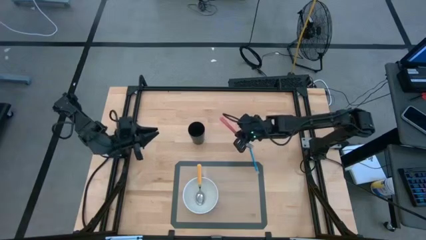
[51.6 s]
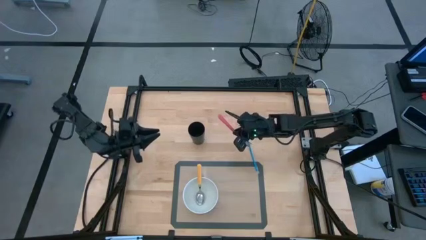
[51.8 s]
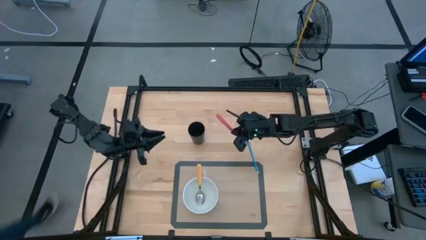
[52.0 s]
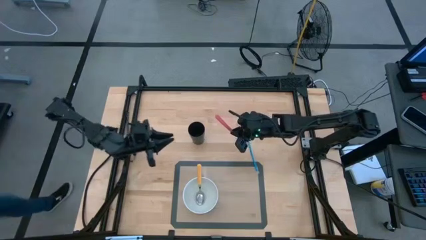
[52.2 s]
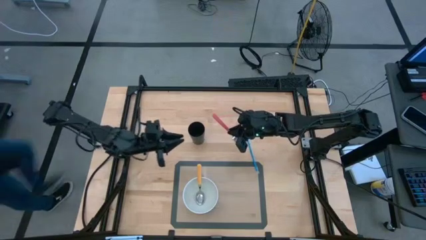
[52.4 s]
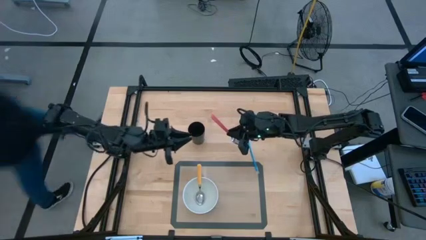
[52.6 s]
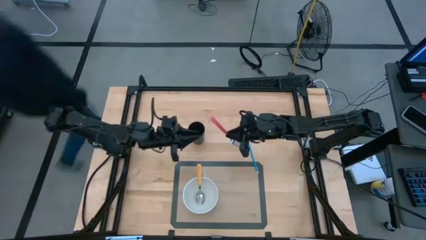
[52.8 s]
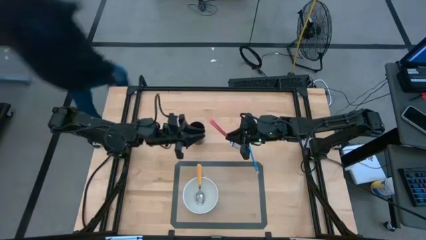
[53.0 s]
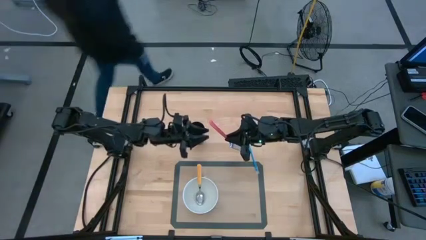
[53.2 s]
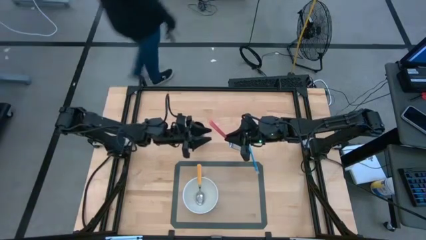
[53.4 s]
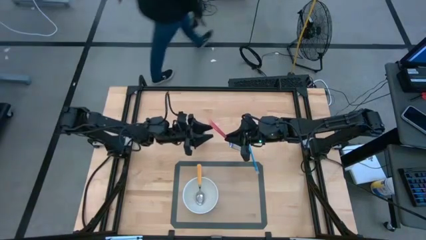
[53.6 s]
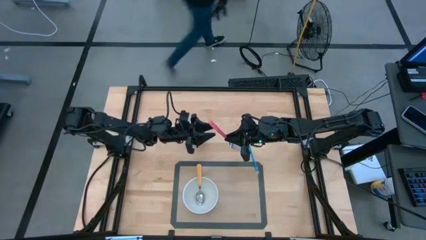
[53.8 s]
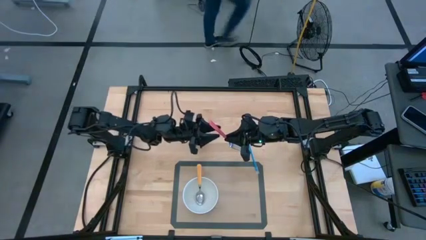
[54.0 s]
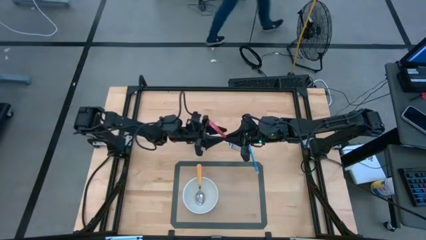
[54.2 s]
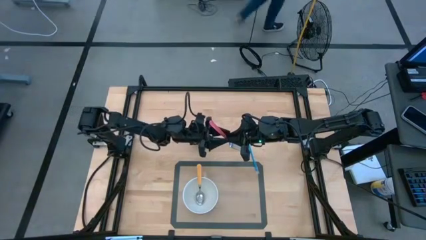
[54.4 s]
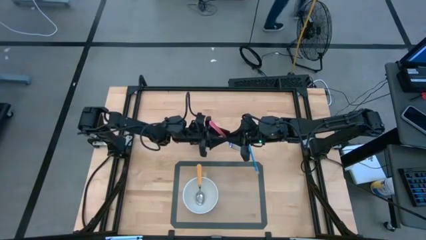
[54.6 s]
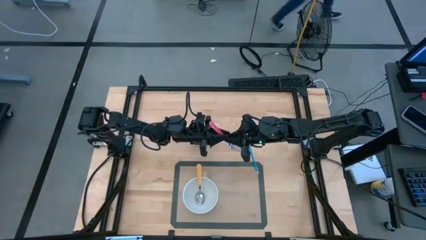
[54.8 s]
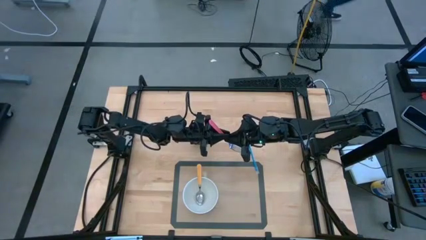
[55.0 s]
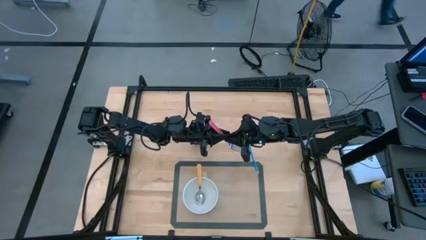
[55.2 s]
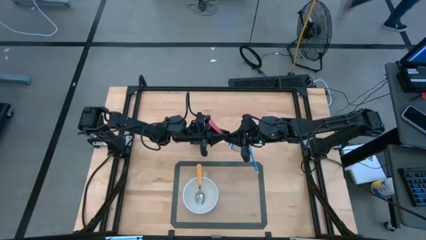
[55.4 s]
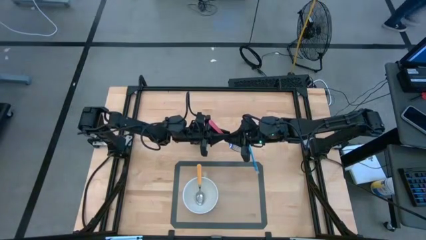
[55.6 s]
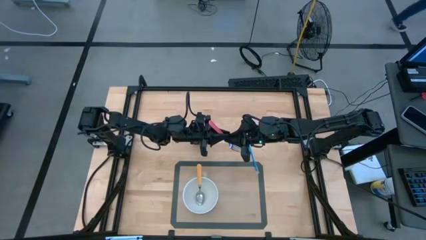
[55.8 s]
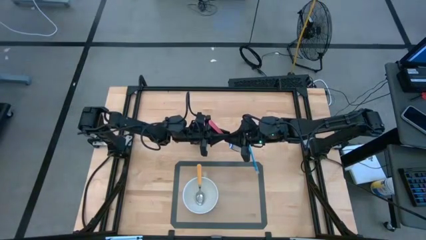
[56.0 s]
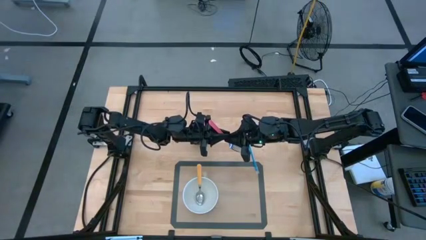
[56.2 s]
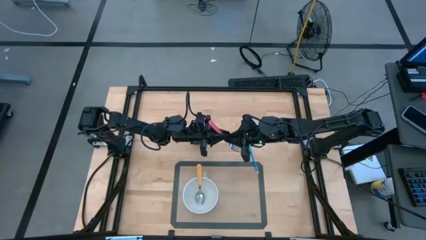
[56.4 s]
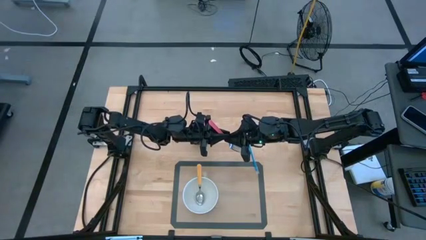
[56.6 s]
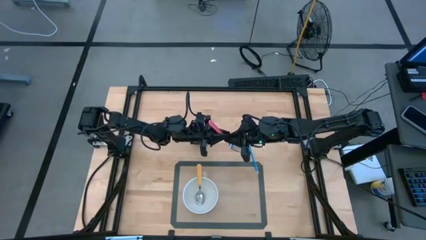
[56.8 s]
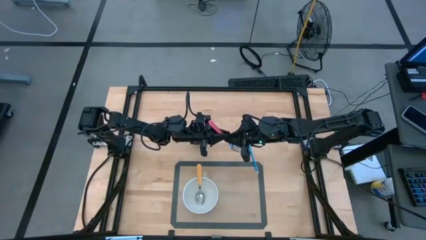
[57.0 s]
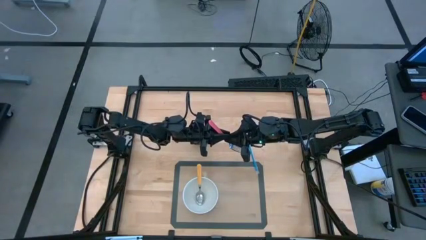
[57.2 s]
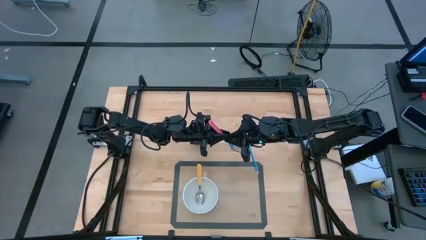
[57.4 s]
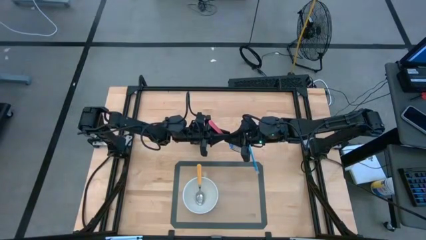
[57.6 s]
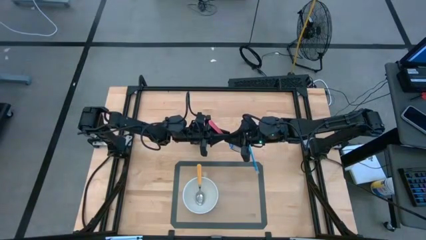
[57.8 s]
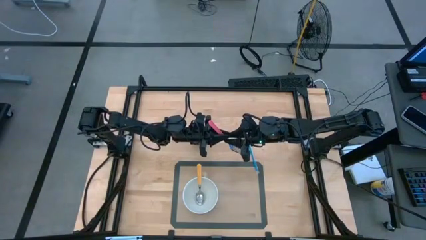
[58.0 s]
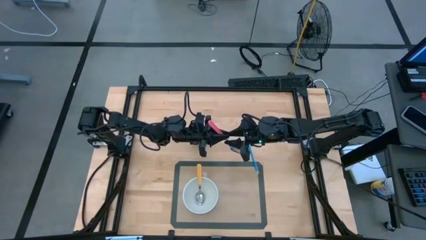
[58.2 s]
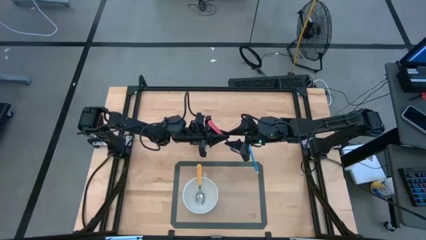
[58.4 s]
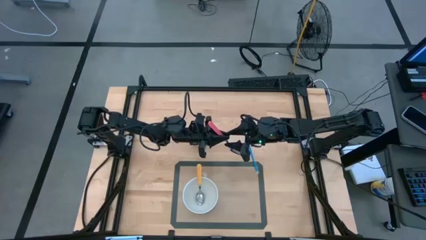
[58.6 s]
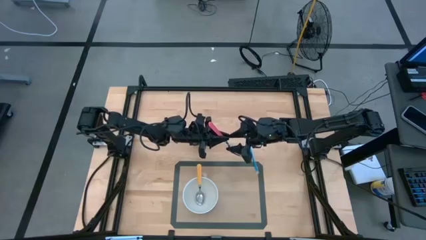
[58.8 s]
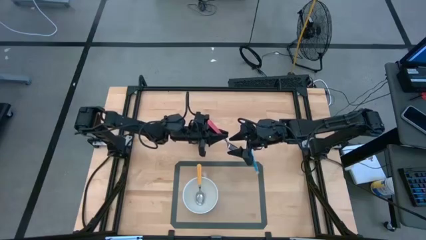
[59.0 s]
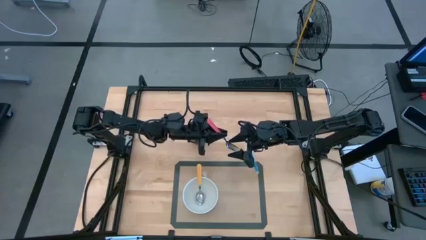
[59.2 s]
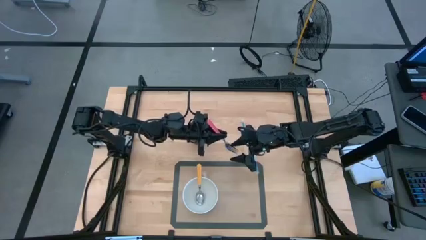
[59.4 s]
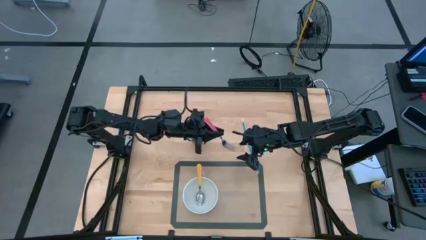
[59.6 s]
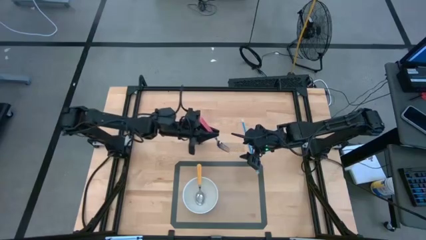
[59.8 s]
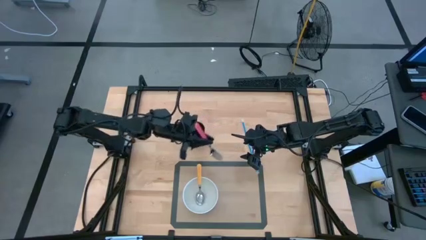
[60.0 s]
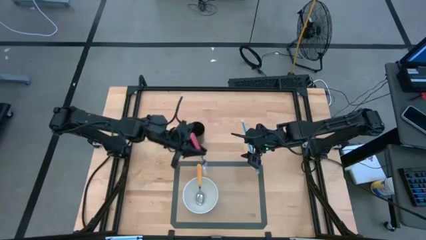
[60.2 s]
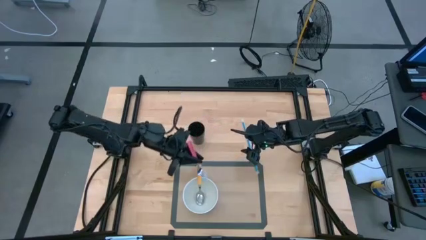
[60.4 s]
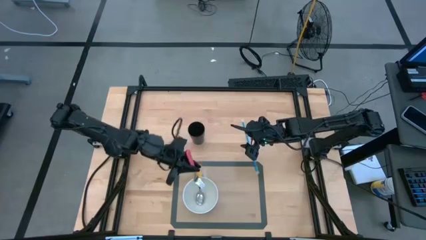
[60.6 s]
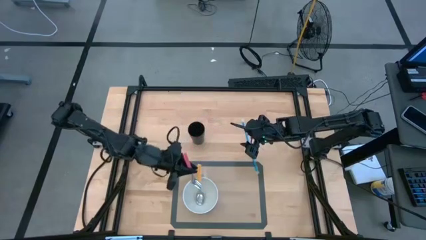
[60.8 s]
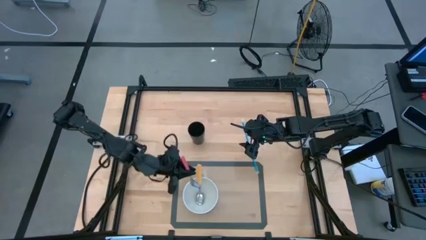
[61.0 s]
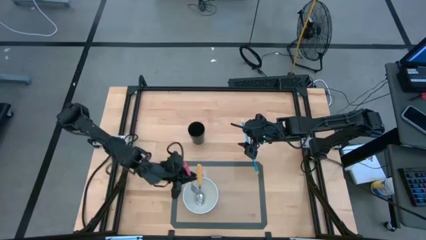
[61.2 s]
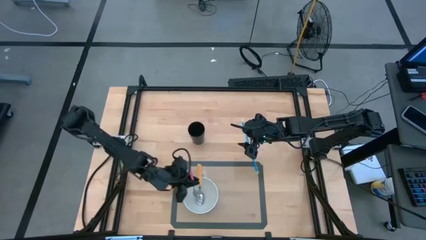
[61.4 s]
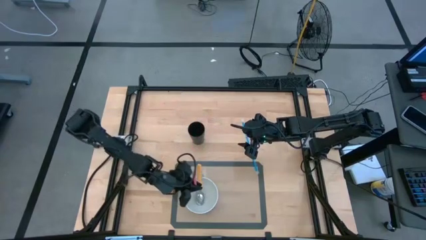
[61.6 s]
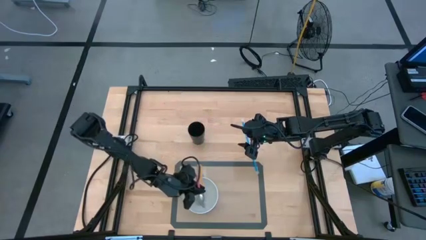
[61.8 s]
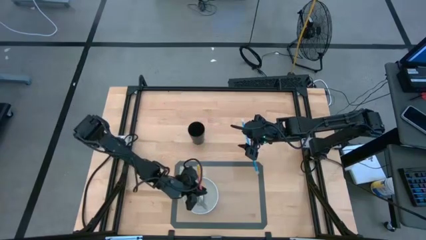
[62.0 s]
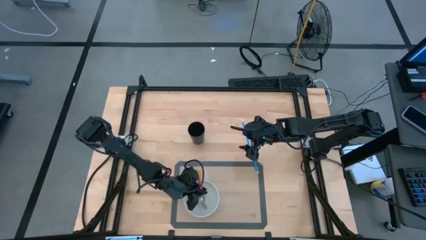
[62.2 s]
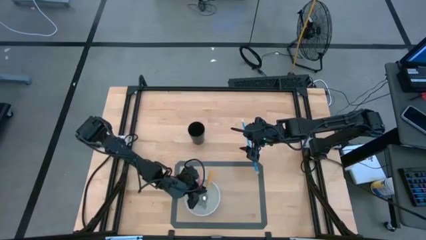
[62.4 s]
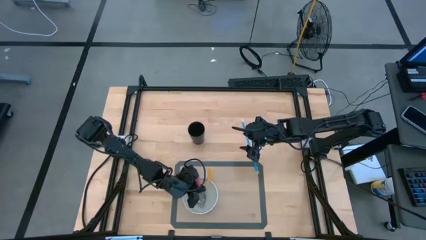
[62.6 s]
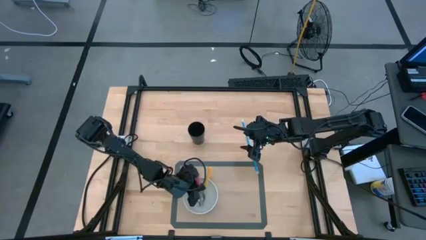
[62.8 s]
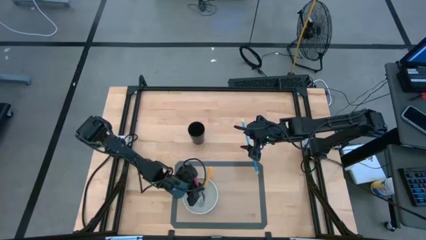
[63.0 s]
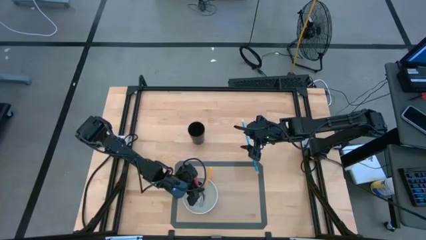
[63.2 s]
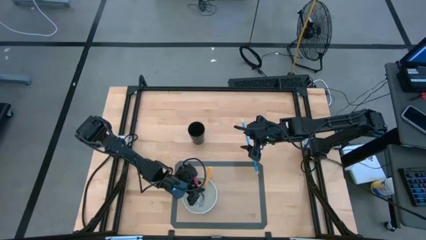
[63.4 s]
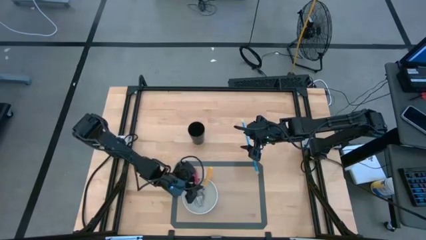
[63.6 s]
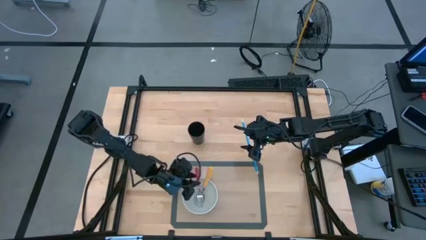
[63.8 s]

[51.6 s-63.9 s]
Task: Pick & Place Utensil
Put the pink fork into the white bowl on the mat

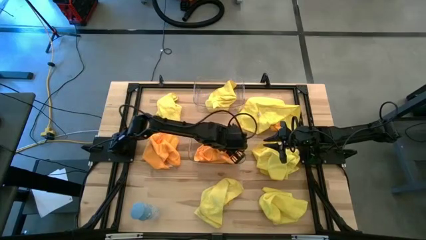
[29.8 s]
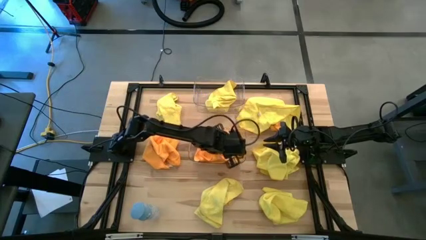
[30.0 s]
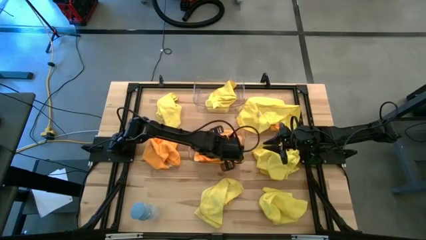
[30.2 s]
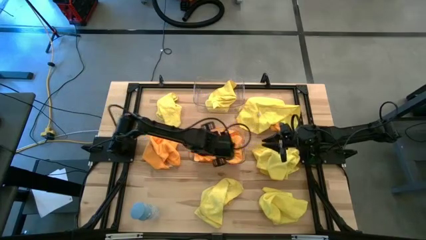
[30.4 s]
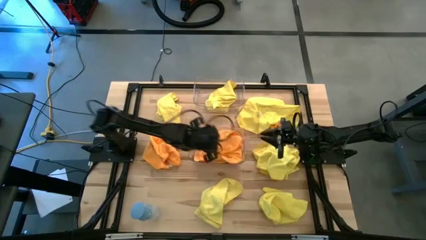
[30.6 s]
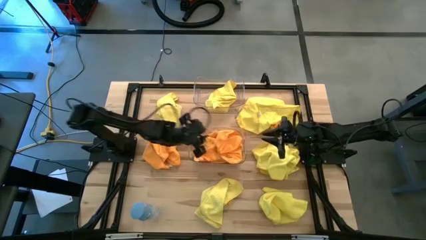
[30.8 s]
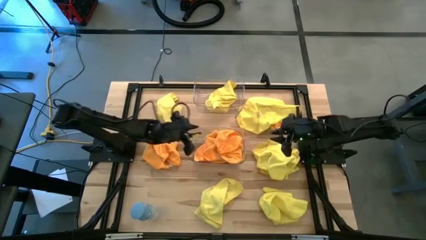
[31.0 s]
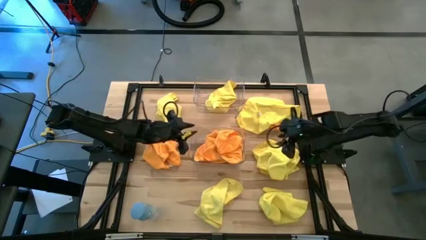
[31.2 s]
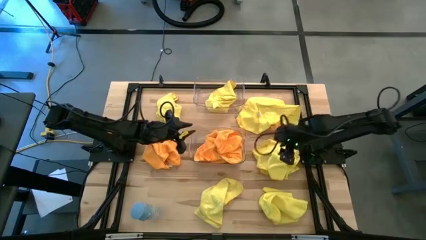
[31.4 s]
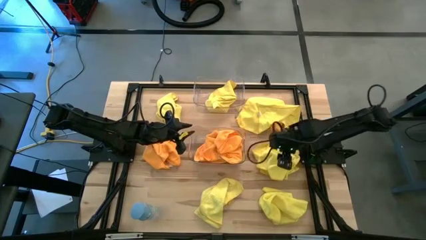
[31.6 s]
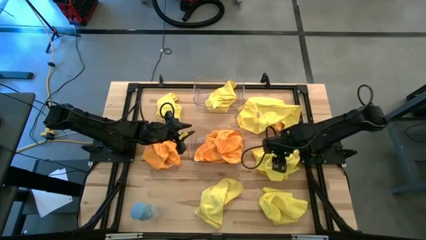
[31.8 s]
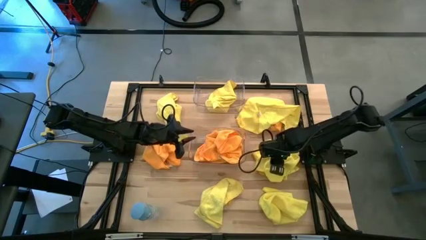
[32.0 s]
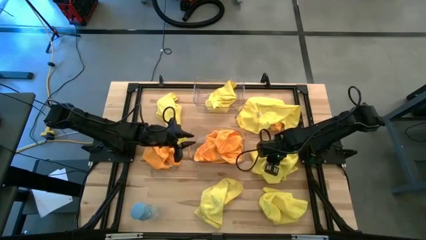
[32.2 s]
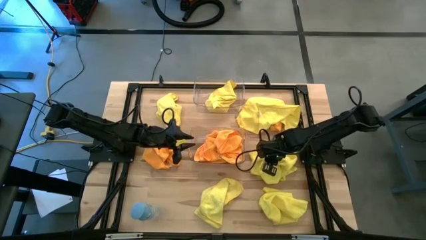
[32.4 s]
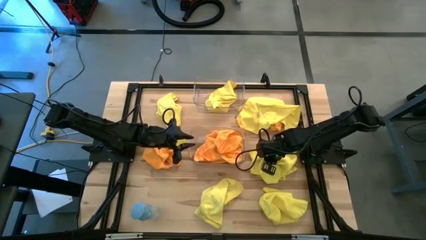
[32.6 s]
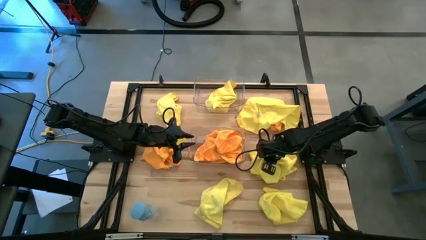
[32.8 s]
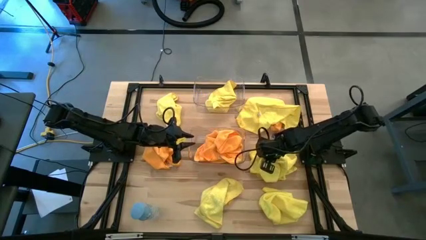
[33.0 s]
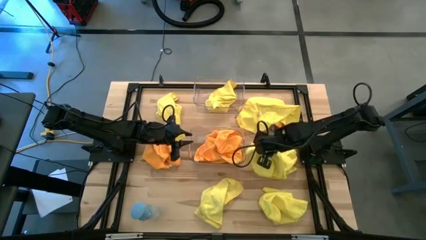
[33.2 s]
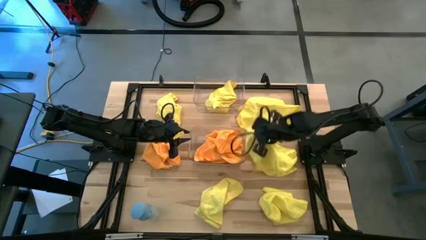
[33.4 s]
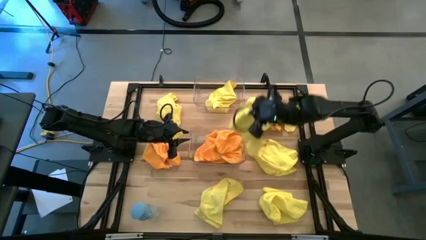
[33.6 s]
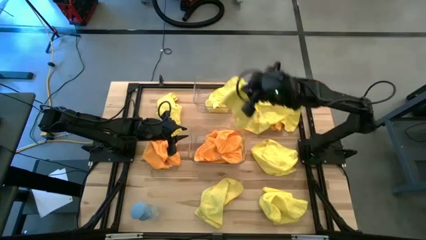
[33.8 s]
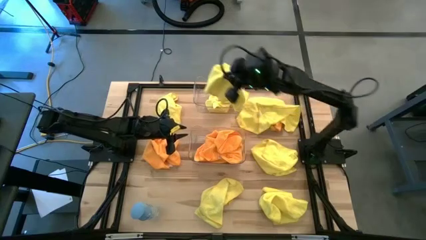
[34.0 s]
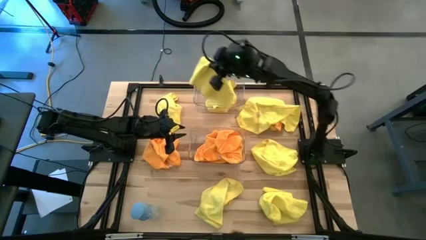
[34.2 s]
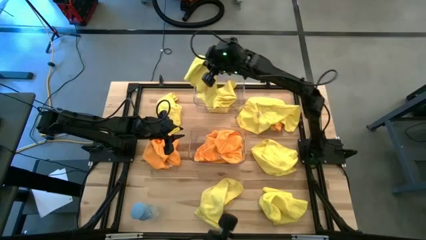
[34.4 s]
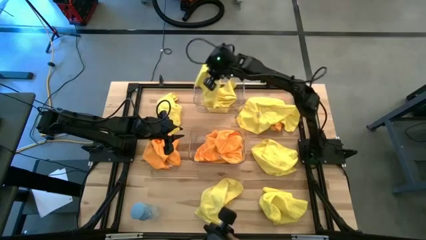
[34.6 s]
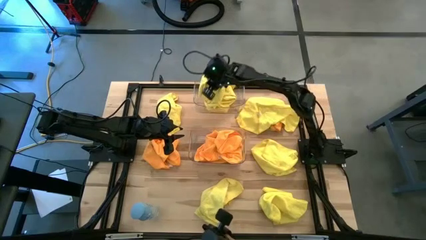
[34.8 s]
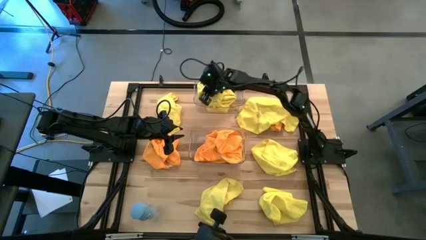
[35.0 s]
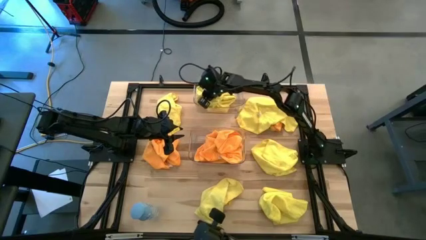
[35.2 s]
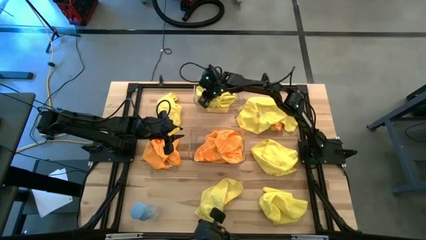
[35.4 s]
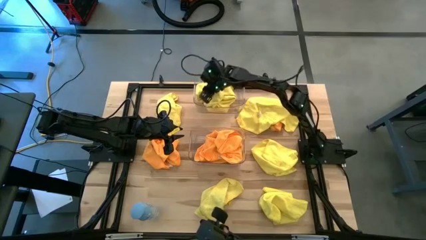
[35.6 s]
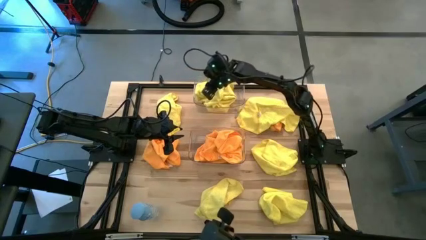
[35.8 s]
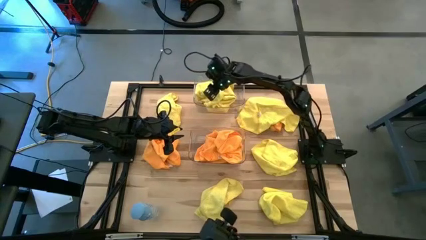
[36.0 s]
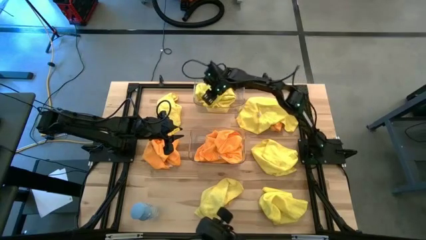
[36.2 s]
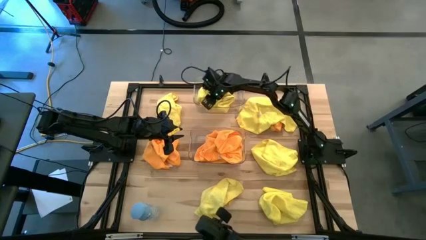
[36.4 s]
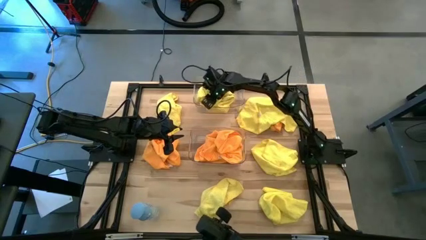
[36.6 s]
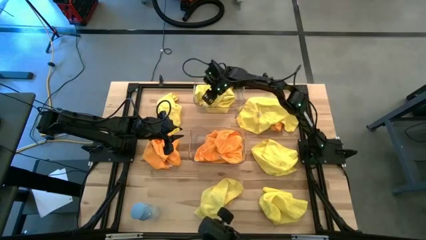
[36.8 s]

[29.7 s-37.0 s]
Task: Sort microfiber towel by color & place in baskets
Put the yellow microfiber towel into the top transparent bin
